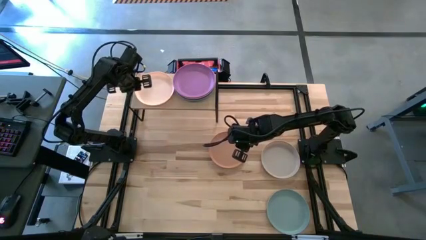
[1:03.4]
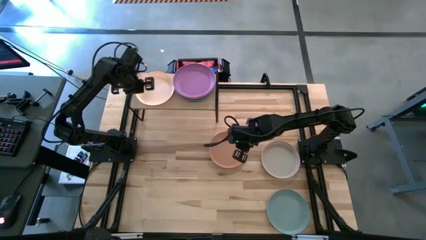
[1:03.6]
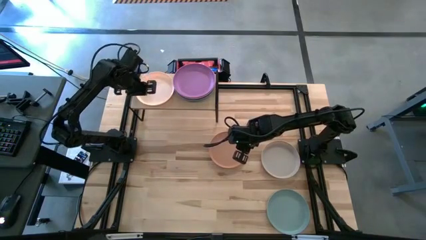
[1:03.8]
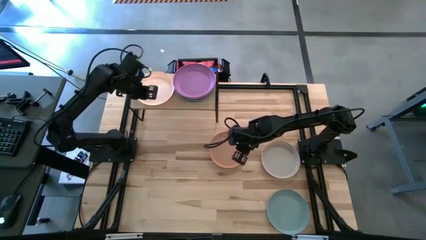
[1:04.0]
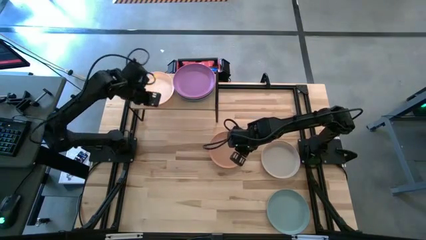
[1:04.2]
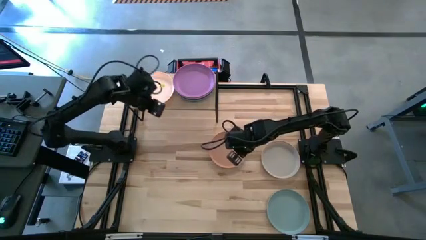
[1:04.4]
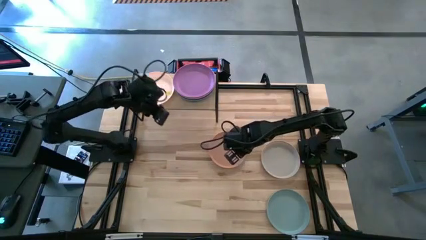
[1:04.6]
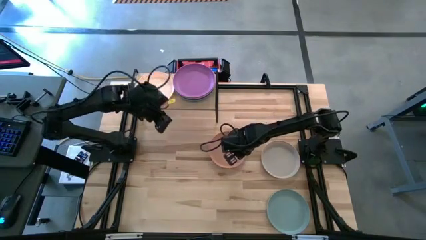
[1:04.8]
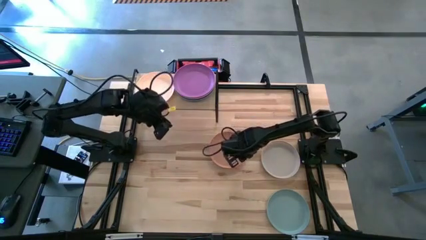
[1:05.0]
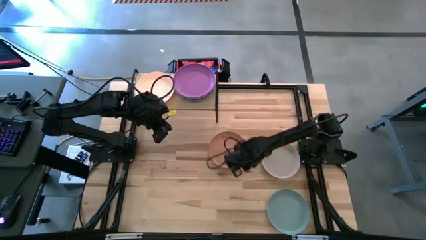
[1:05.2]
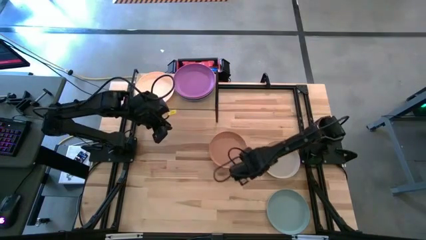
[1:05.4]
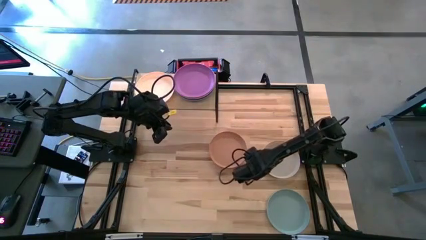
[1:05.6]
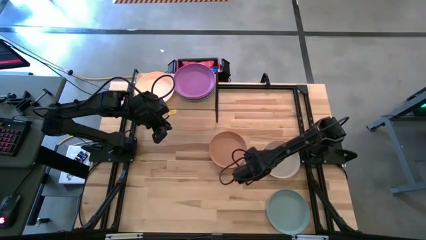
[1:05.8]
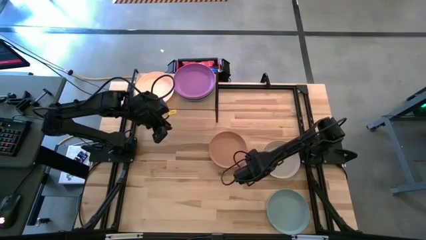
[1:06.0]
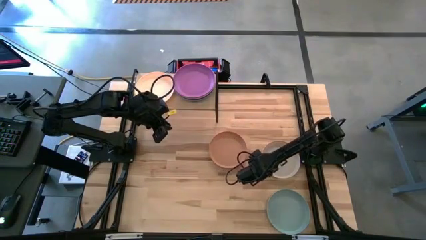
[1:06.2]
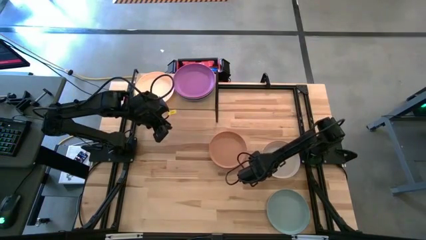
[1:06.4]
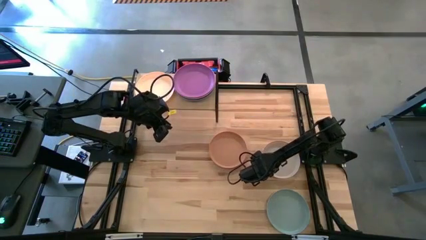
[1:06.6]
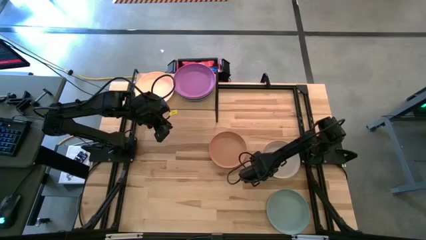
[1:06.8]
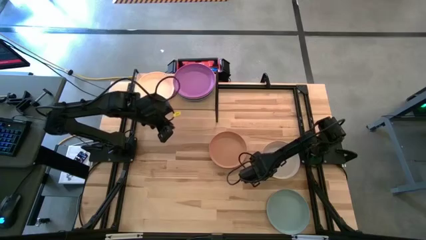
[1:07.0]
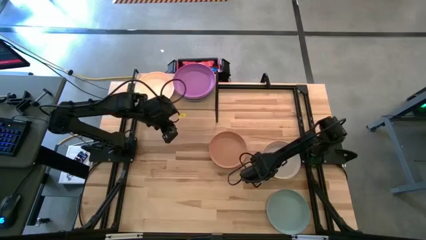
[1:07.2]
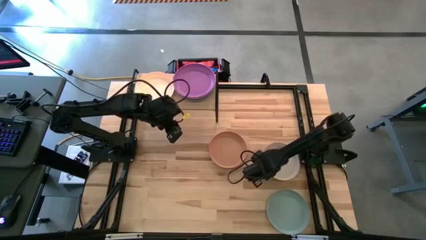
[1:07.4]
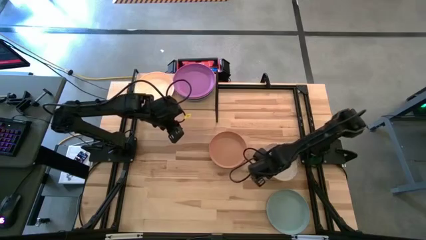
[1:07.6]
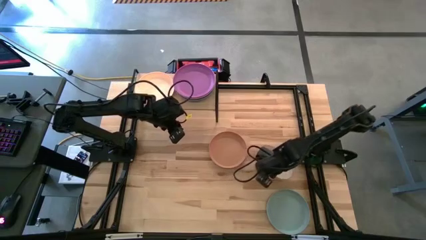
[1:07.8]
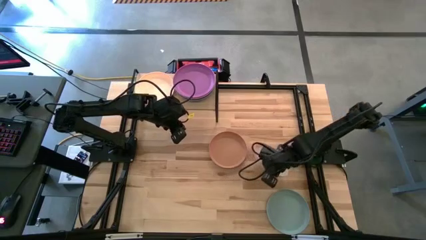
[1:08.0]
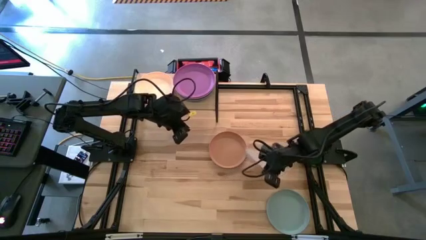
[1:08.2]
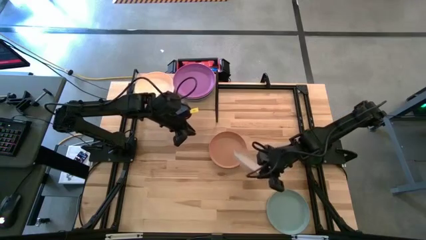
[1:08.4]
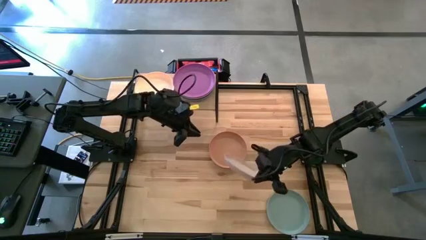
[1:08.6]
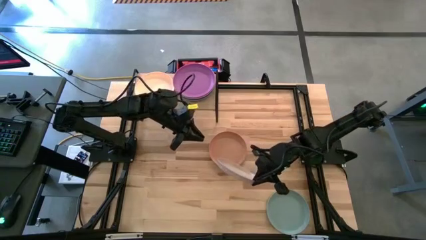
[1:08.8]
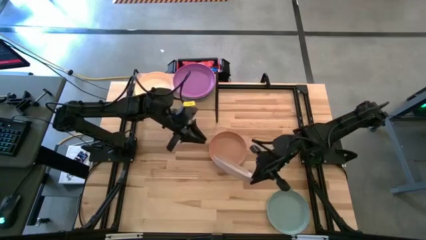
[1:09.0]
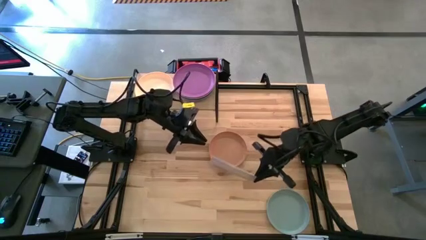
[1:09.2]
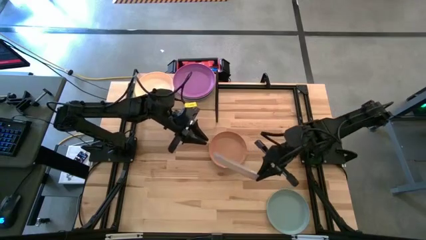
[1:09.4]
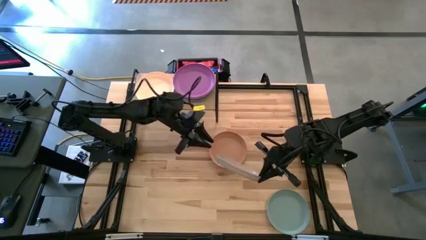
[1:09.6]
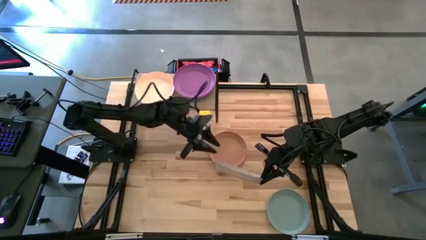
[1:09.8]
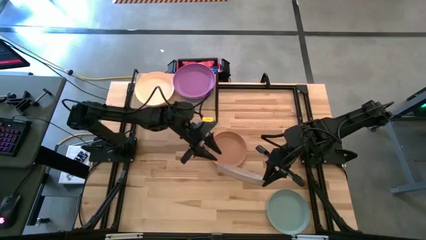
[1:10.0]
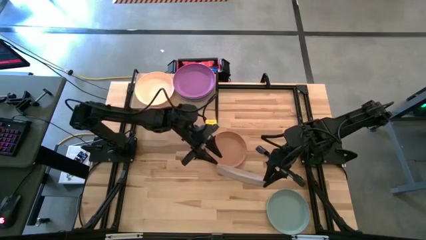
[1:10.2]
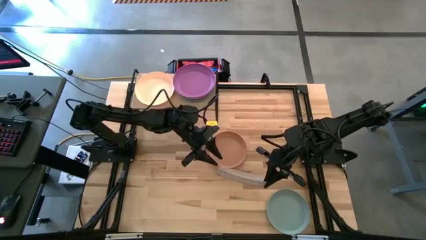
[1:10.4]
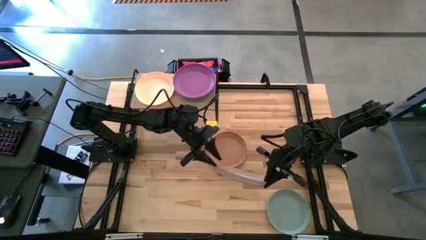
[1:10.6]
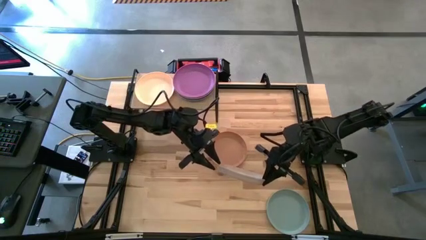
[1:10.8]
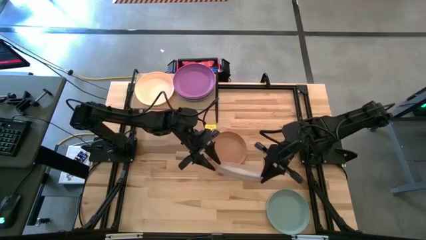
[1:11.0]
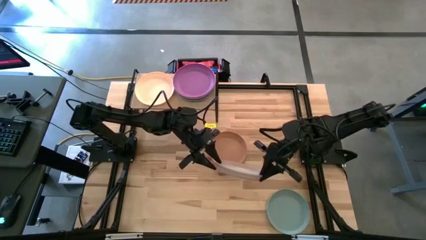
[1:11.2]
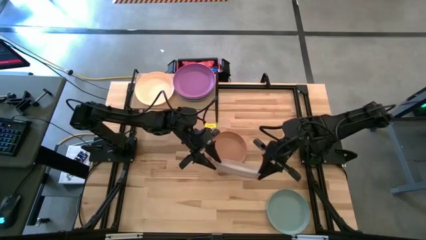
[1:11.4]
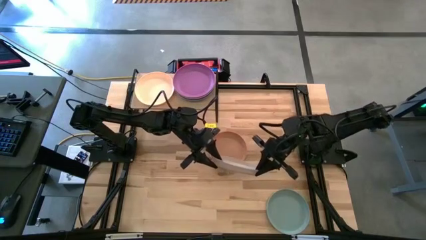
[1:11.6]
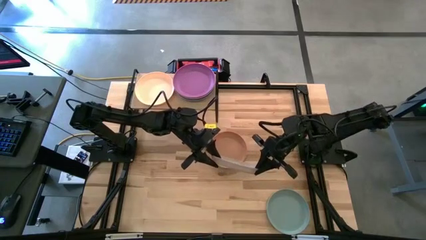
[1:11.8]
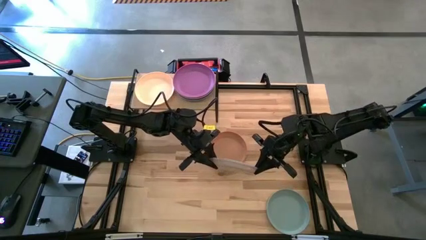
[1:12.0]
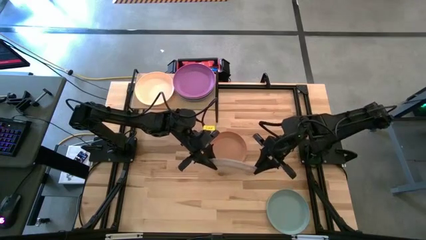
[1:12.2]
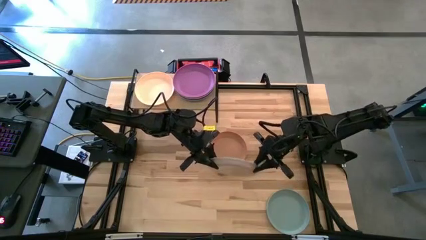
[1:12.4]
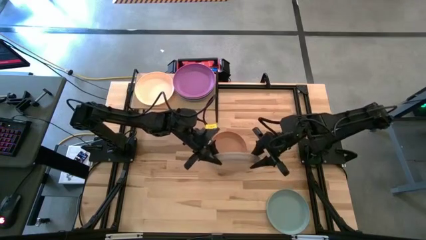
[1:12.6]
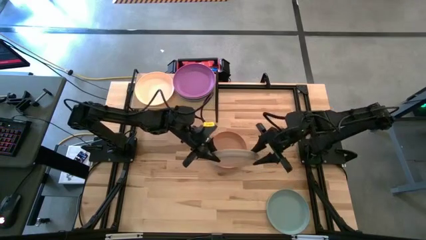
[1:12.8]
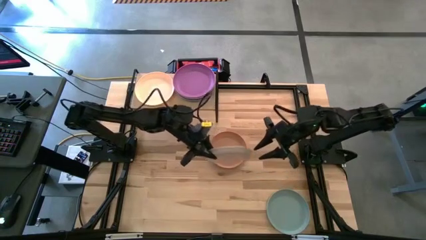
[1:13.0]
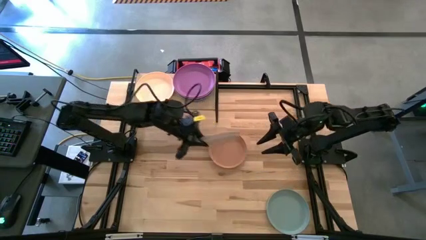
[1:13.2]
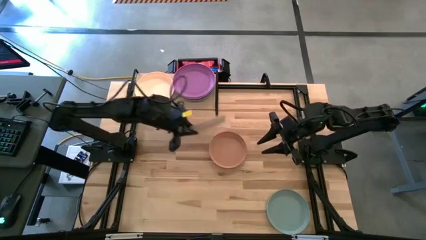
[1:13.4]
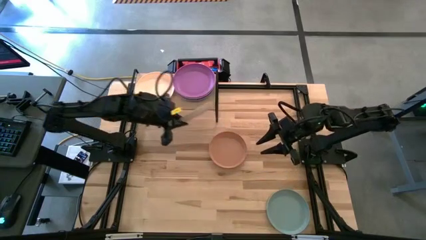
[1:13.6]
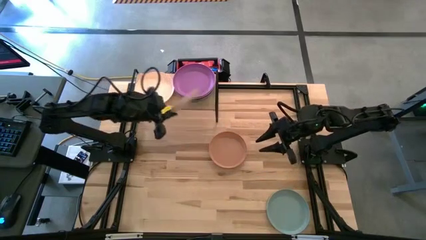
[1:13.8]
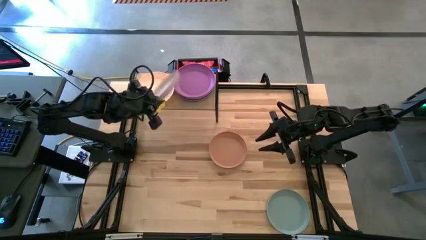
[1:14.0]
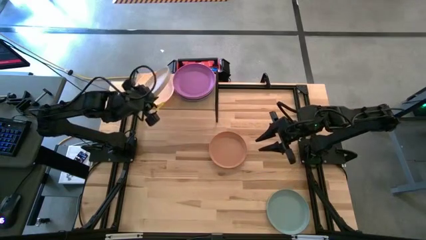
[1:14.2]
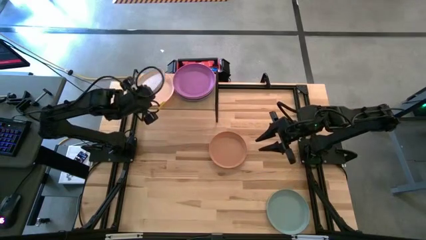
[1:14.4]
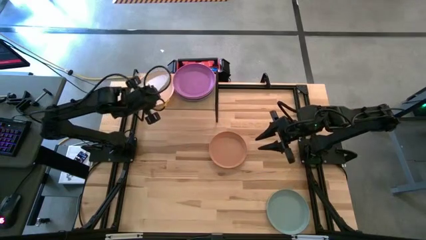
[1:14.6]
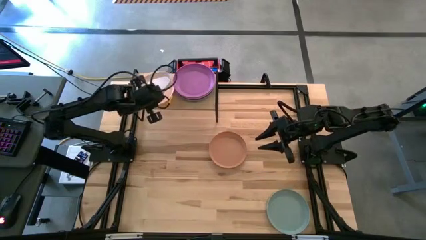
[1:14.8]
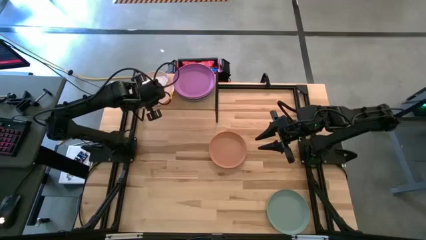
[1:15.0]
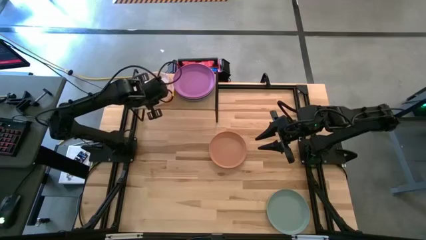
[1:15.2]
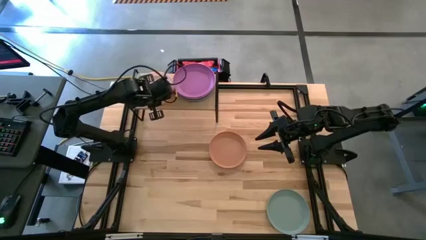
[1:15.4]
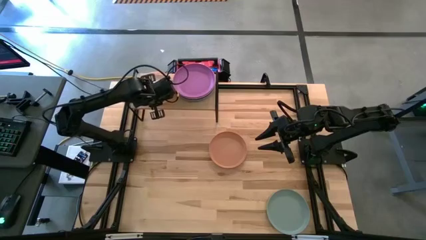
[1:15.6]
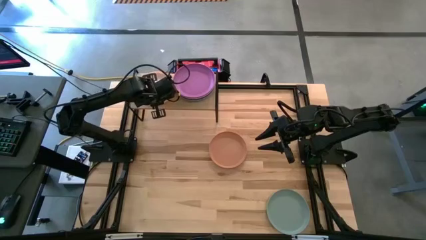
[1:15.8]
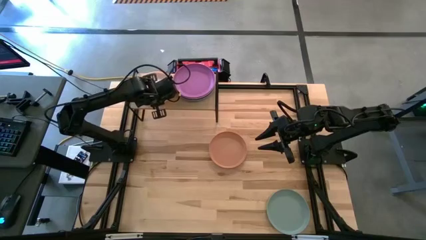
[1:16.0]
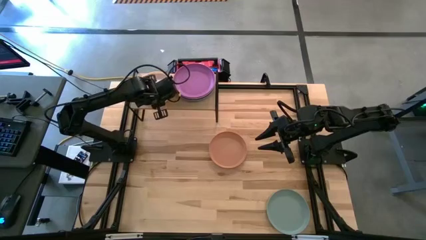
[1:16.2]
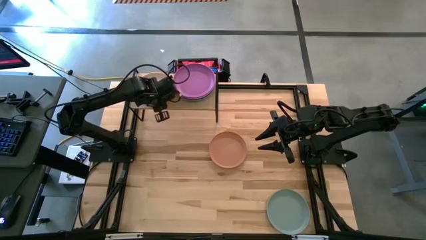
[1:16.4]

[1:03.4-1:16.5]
Task: Place and stack plates onto a shelf
Stack the white plate on top of the light pink plate on the shelf

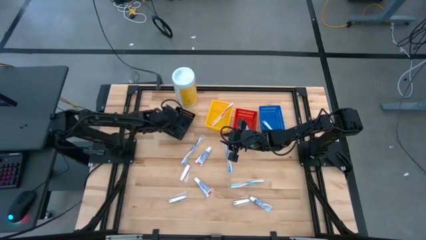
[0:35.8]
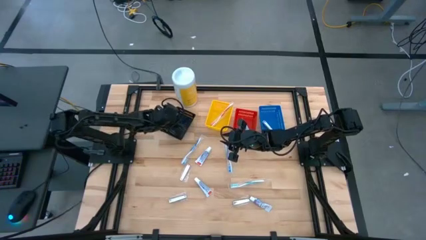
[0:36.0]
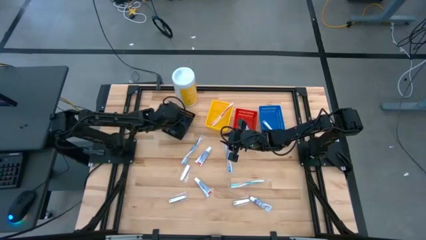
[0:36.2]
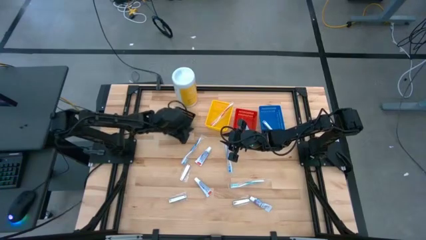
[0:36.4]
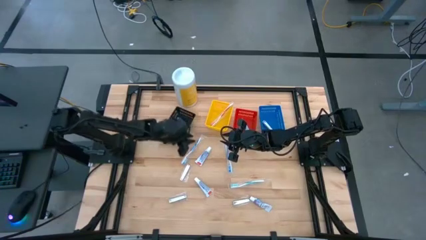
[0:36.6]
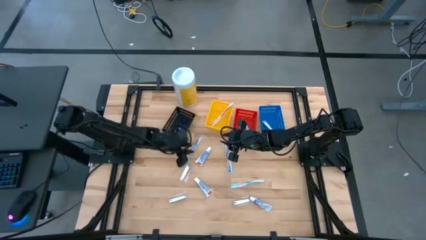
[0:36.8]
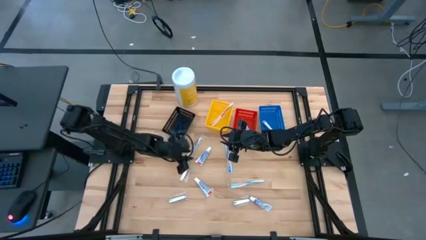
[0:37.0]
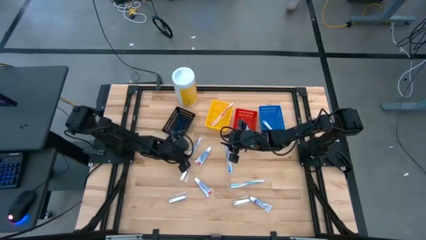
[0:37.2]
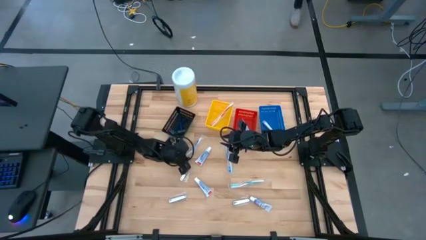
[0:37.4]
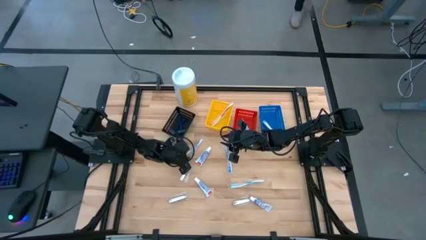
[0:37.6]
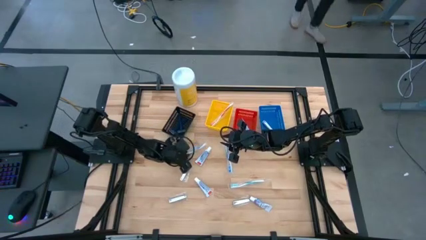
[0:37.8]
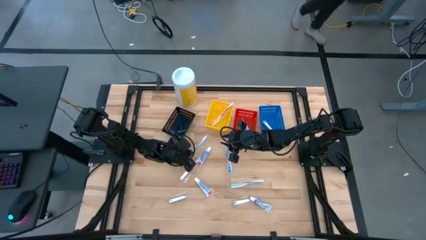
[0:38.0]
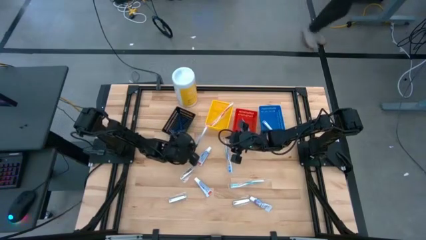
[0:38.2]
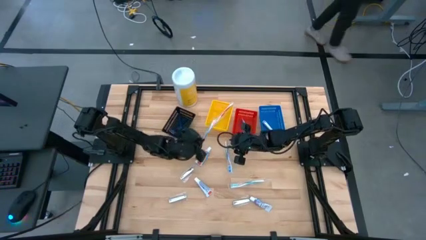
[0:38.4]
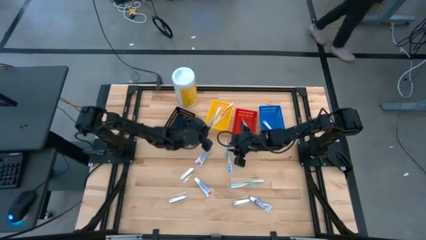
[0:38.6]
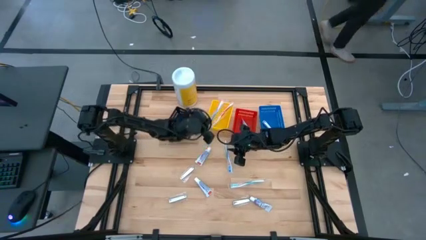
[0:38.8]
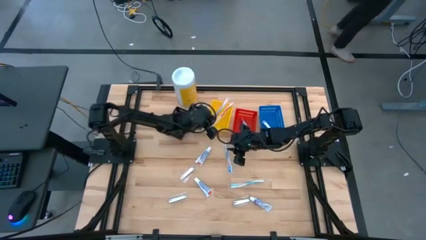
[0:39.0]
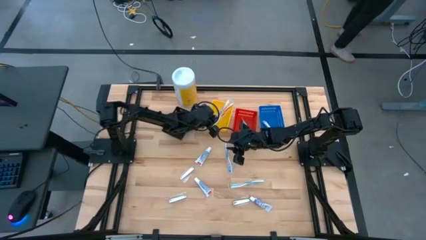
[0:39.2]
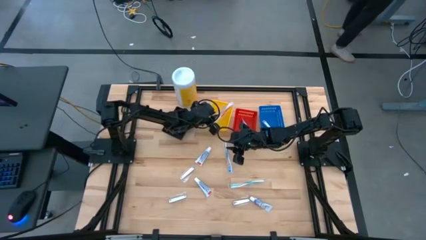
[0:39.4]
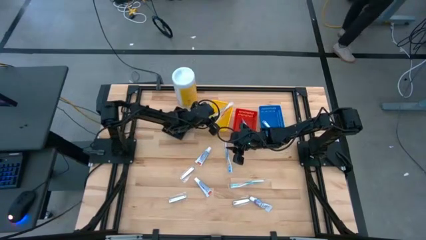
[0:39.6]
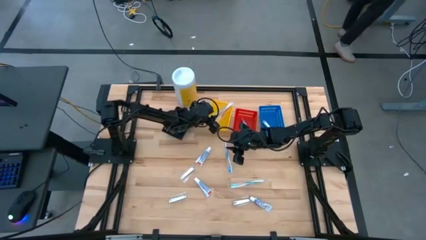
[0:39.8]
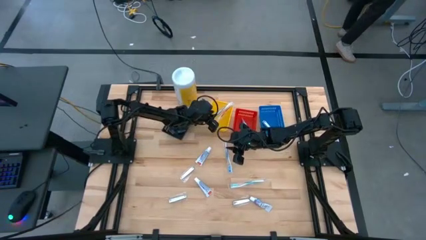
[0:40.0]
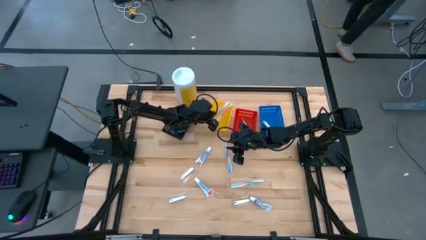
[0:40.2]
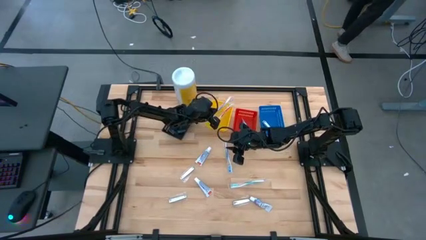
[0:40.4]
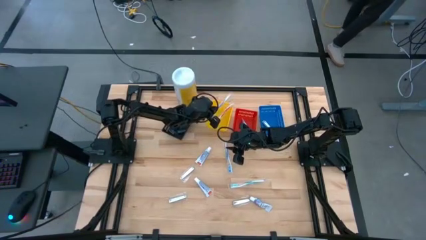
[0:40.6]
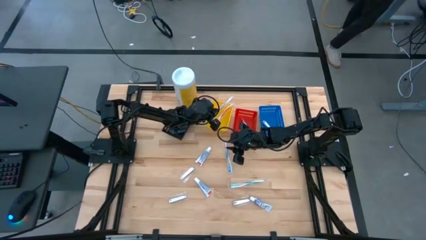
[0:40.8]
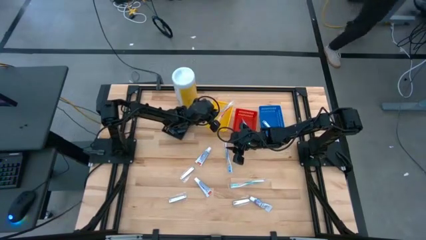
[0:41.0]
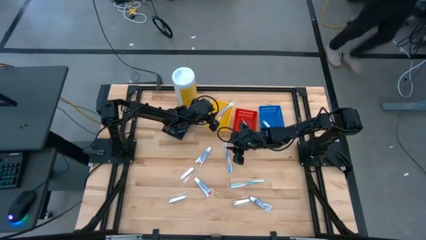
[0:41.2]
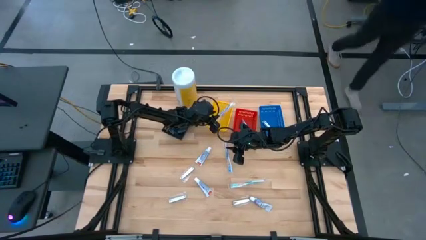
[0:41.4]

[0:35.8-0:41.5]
Task: Pick & Place Travel size toiletries
Put the blue toothbrush into the yellow bin
